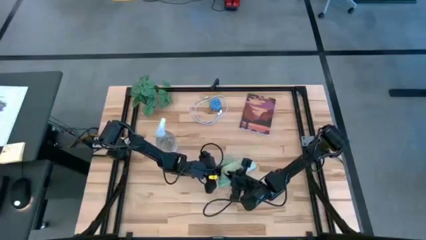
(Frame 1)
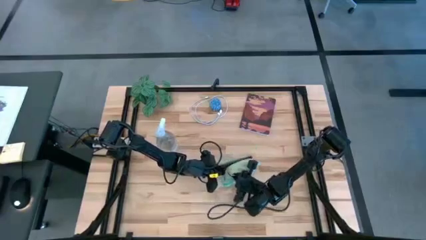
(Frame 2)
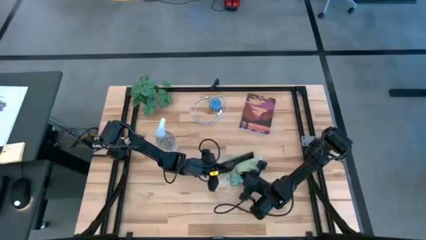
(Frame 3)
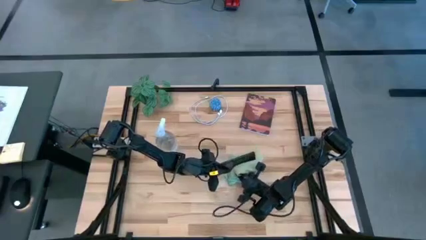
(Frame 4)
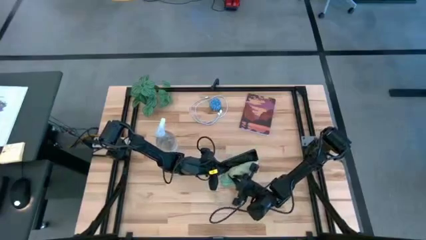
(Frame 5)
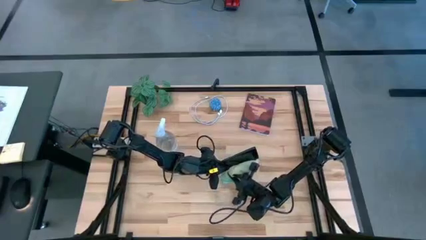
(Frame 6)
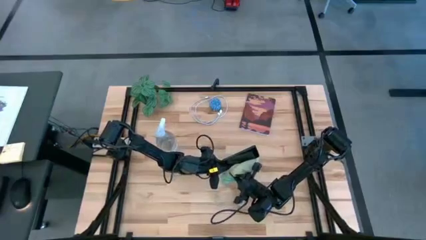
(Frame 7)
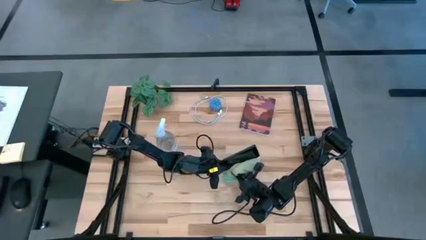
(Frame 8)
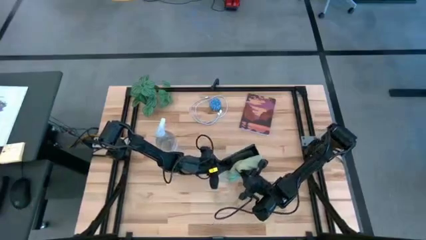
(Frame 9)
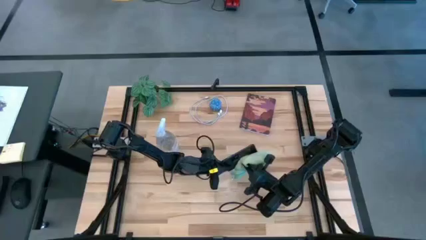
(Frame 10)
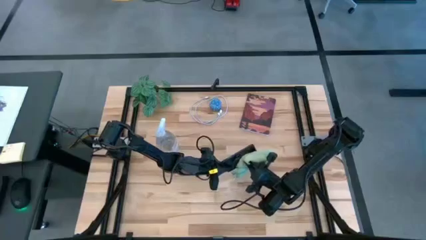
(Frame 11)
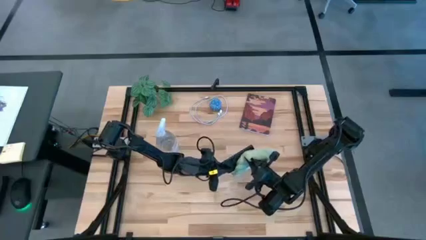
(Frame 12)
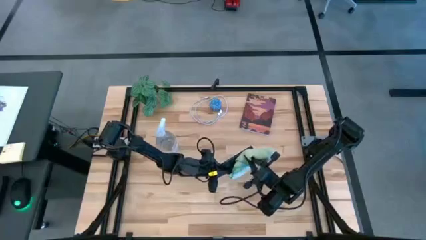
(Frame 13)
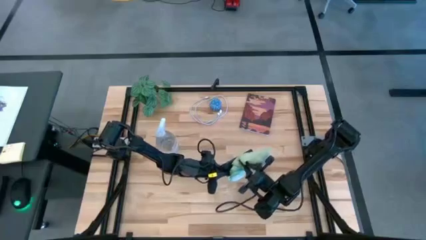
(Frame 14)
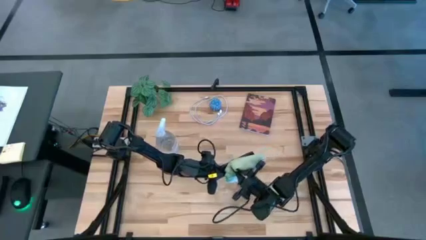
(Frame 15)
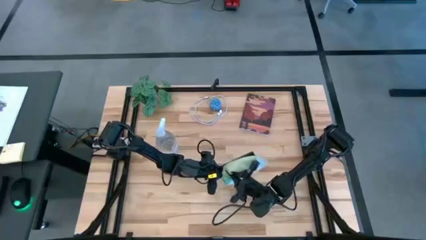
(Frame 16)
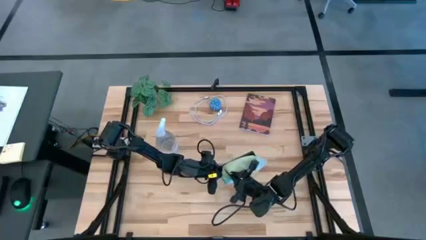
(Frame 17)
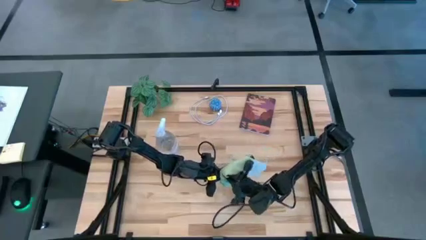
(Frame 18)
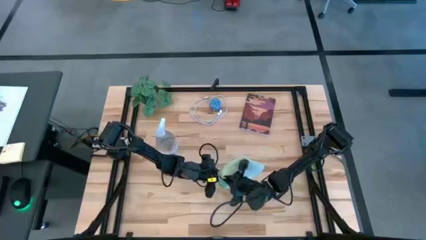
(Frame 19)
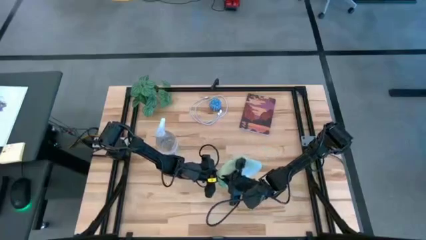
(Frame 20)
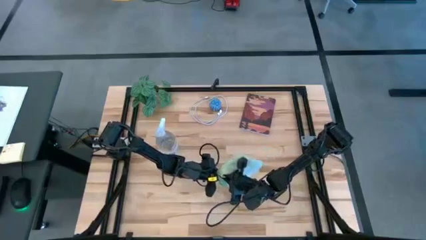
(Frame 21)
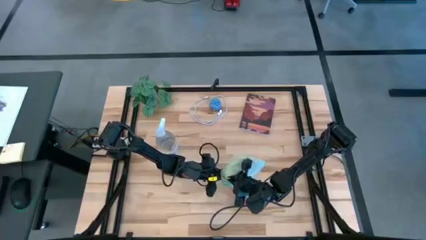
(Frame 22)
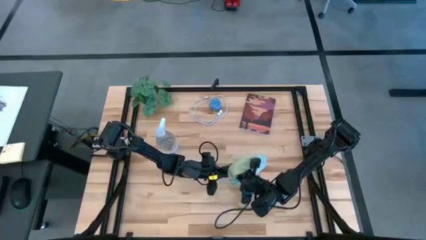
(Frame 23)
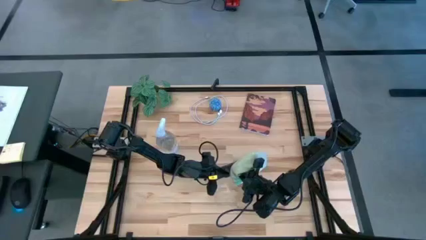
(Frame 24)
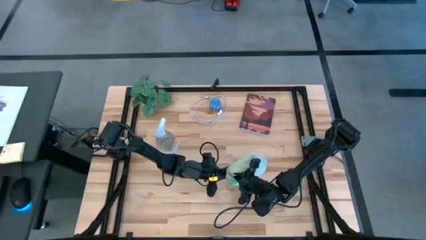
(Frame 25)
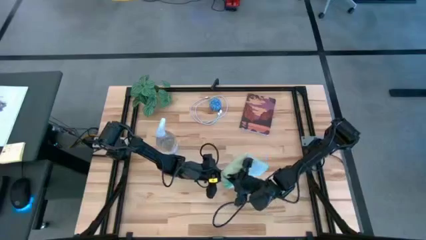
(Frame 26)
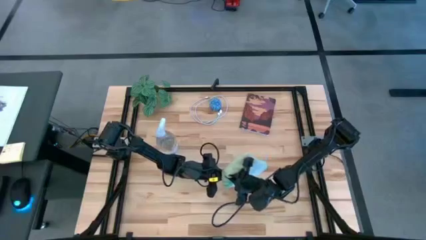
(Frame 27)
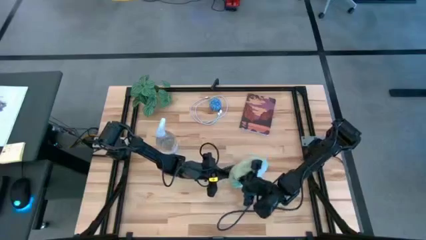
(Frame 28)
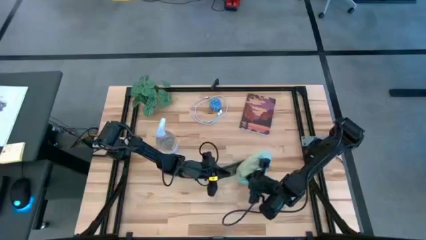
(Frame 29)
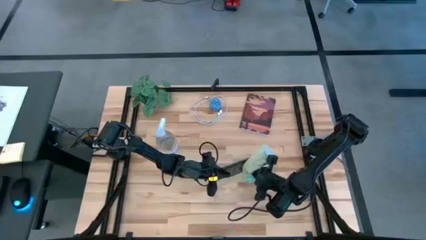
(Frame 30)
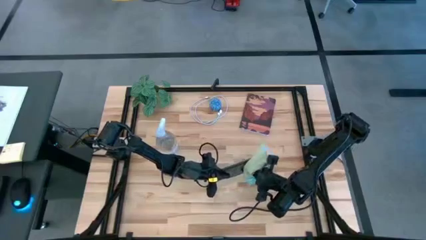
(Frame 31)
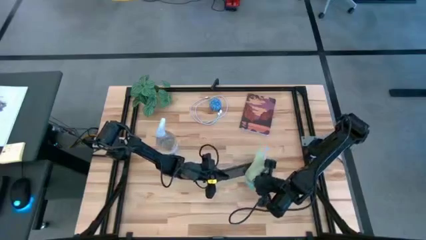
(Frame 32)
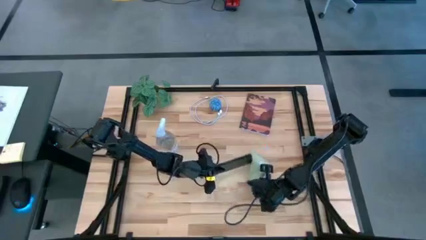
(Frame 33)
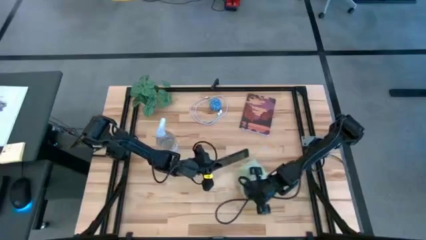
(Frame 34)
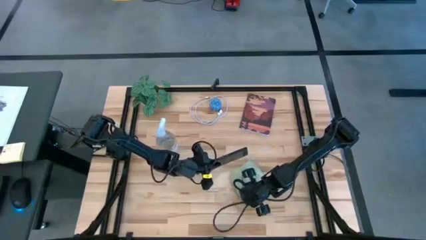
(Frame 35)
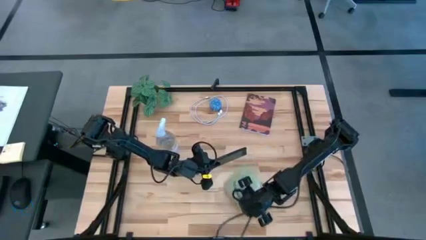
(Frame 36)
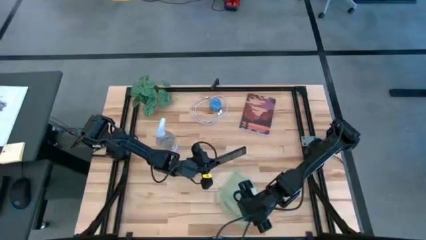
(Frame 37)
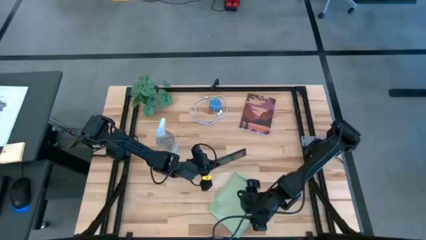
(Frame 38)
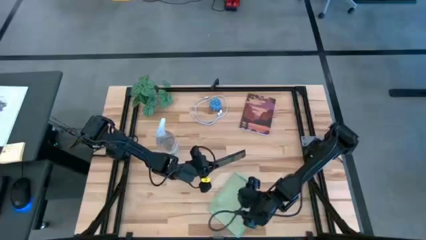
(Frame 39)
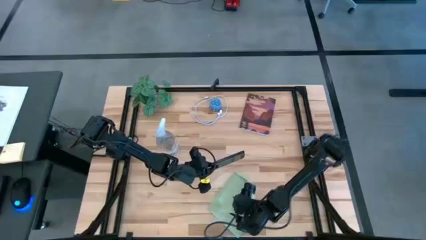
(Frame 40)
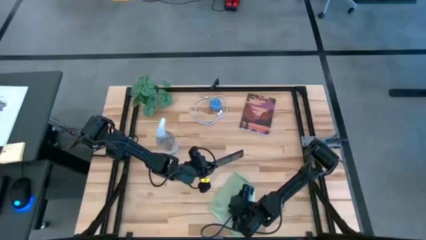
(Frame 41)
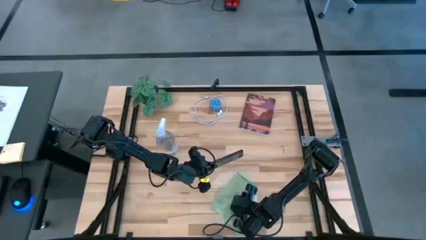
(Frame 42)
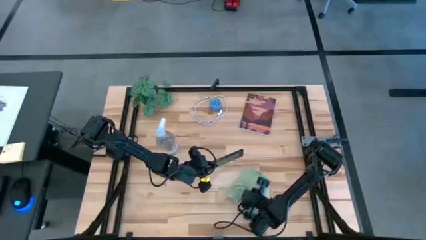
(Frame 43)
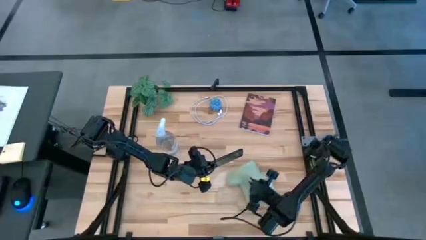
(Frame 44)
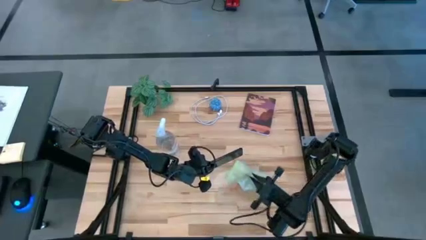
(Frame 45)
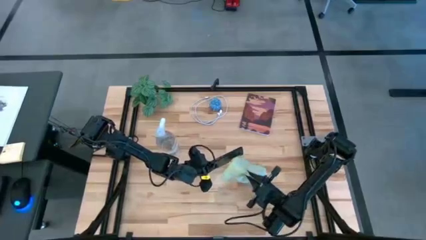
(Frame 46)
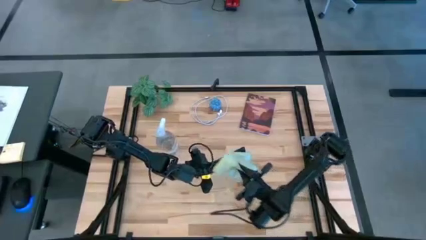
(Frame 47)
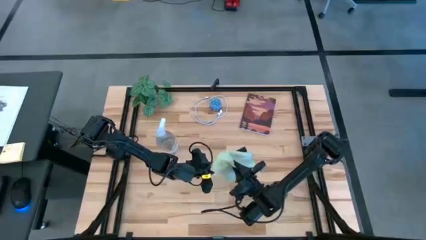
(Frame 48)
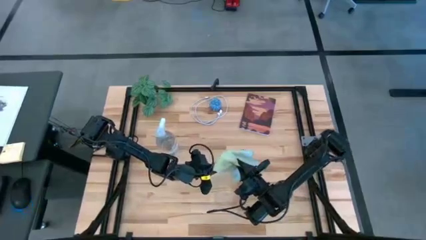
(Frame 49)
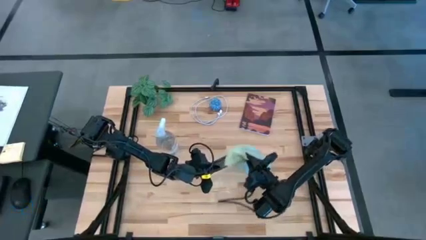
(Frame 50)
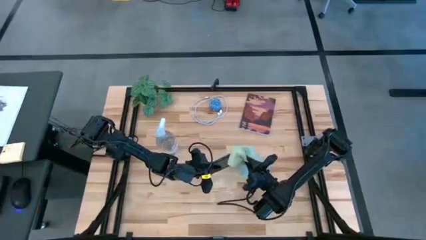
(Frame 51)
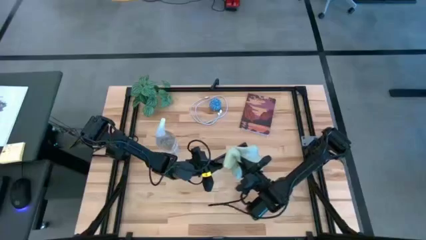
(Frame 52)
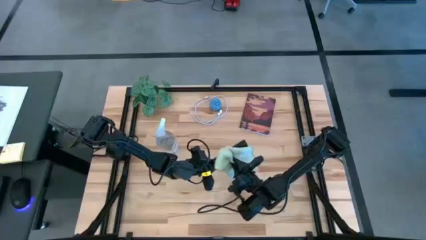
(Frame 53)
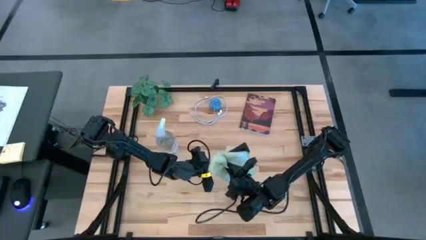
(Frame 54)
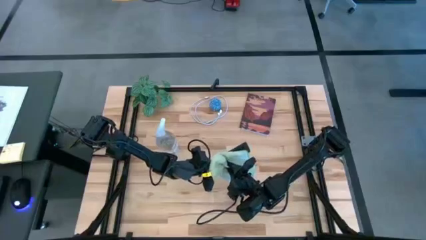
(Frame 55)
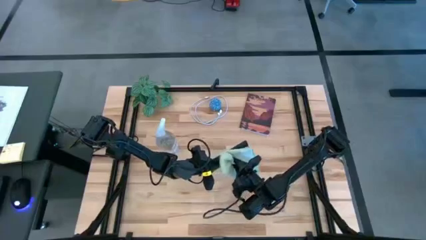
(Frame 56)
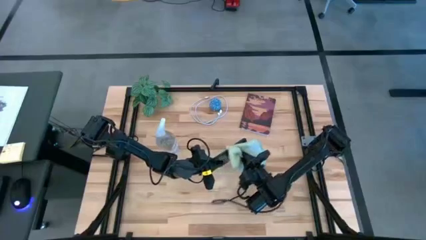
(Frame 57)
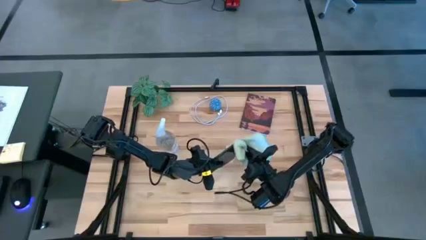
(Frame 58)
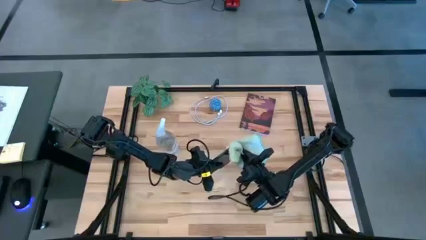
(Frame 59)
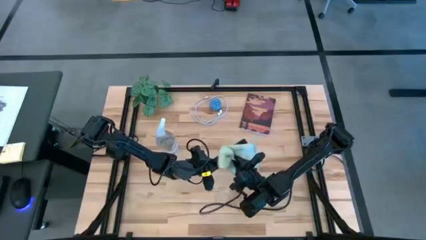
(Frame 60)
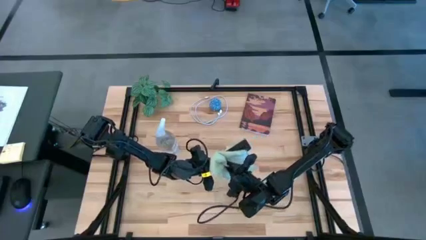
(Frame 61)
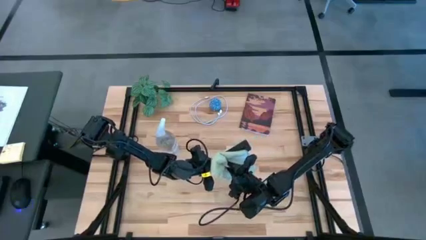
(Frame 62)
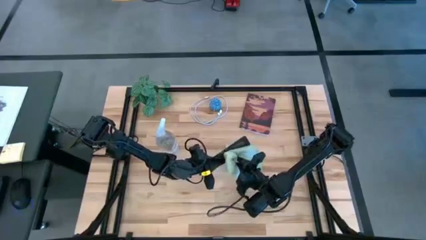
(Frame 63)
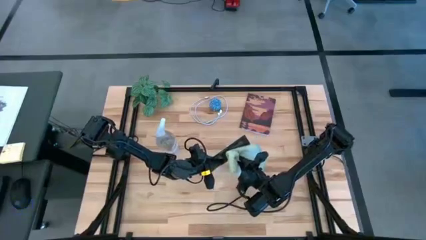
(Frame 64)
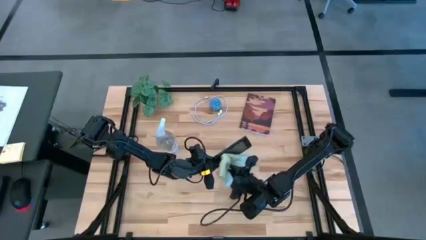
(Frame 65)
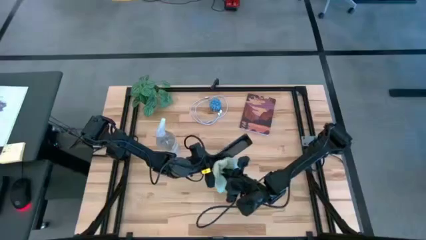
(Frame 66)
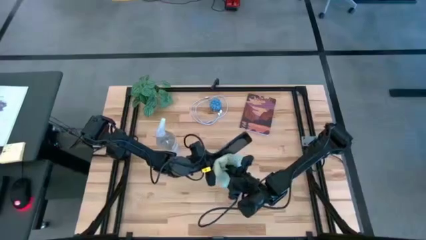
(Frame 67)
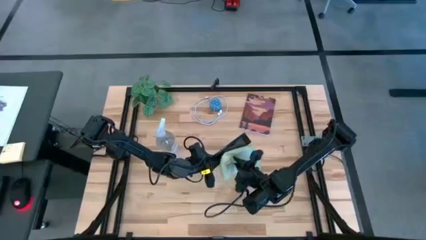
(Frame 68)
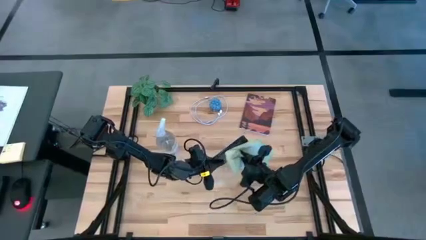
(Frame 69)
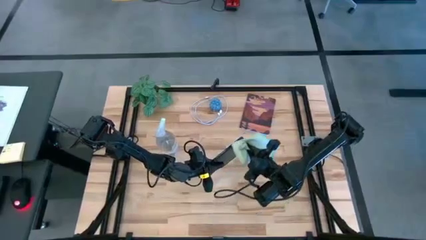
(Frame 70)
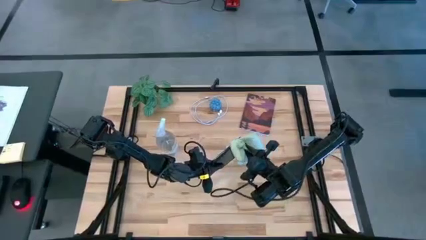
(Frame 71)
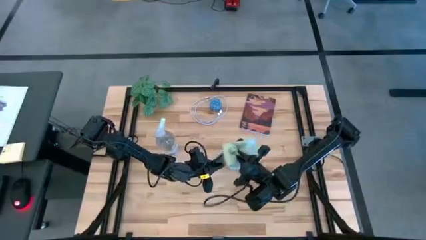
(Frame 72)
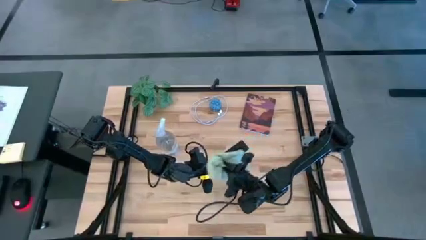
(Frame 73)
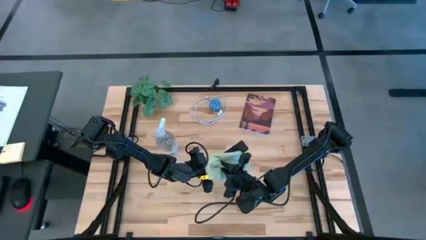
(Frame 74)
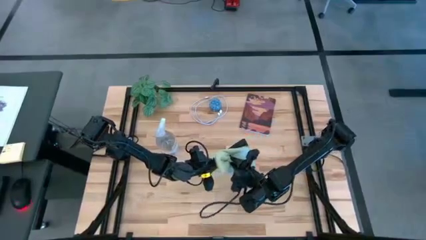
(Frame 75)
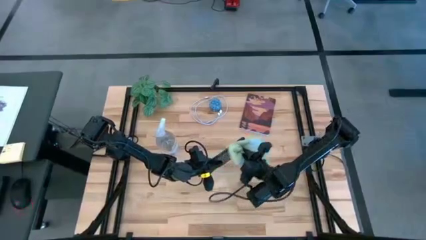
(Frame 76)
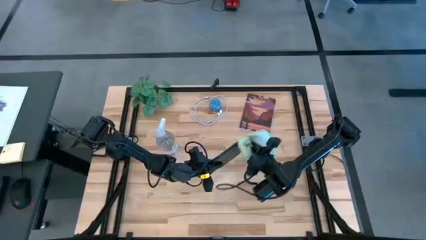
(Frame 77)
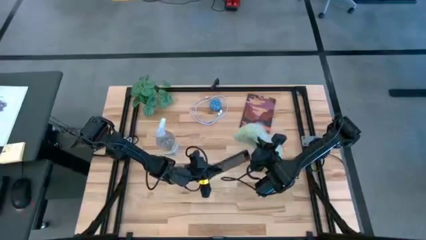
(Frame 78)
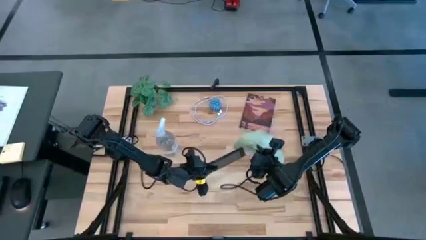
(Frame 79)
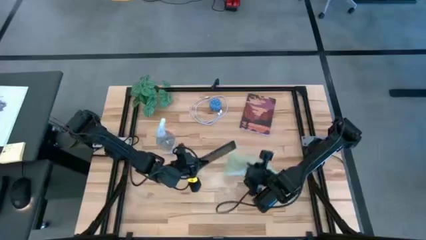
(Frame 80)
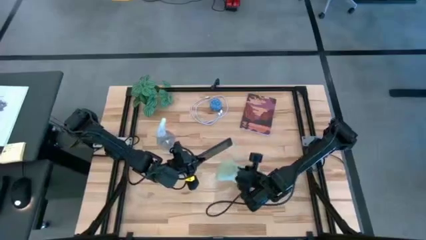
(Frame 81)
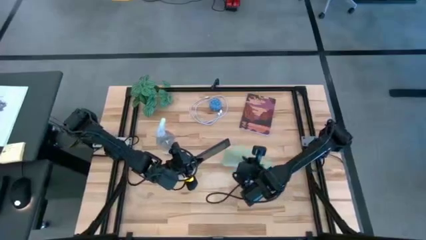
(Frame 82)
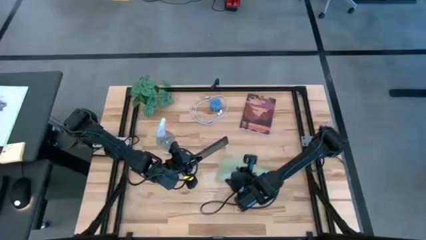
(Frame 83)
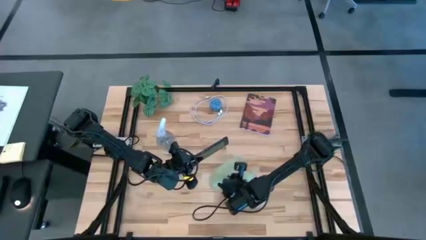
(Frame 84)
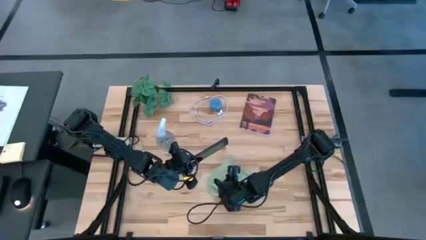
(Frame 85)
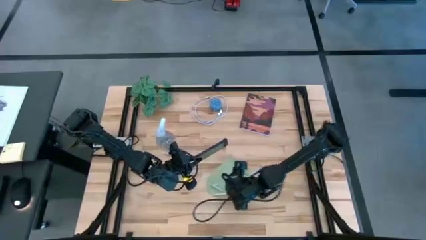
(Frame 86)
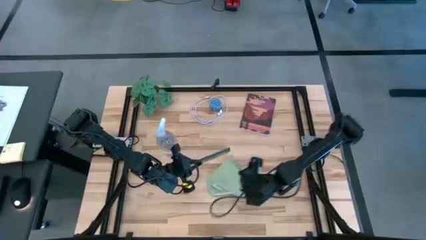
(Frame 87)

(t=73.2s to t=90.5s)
Task: Apply microfiber cloth
Wipe the front of the black cellphone with the green microfiber cloth
